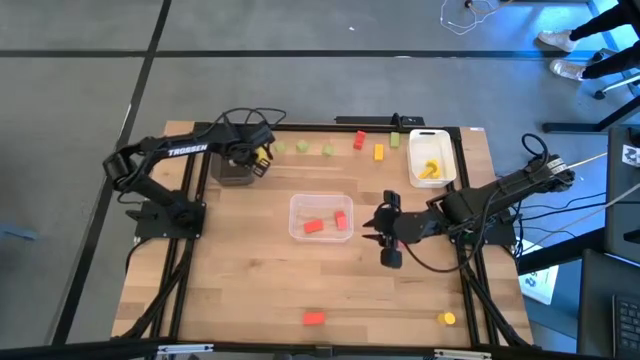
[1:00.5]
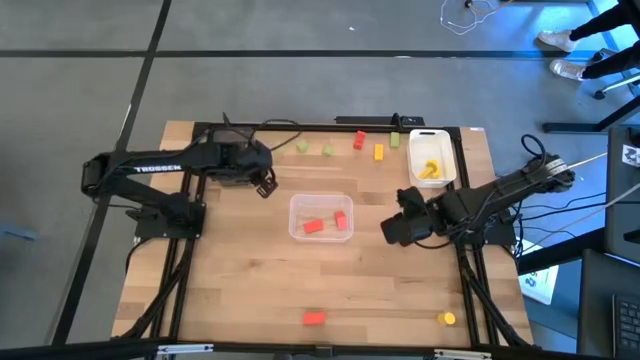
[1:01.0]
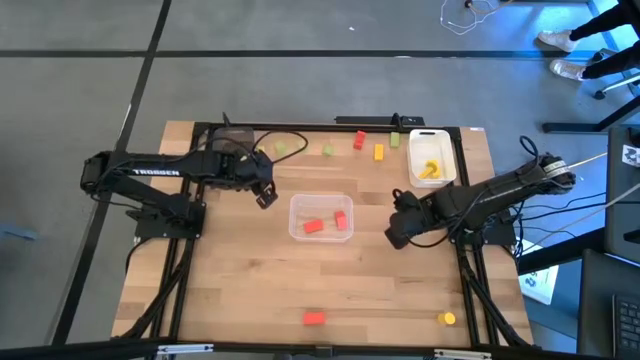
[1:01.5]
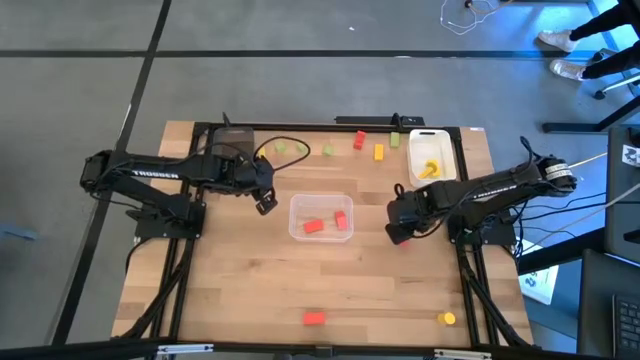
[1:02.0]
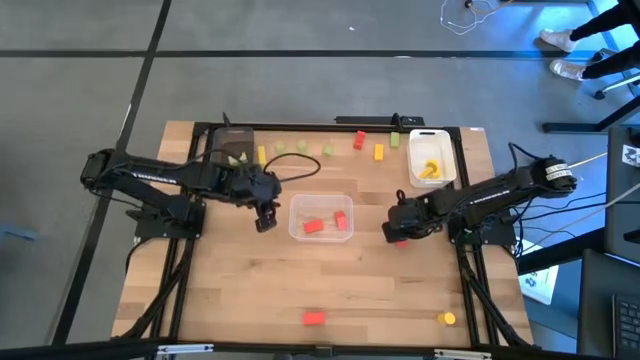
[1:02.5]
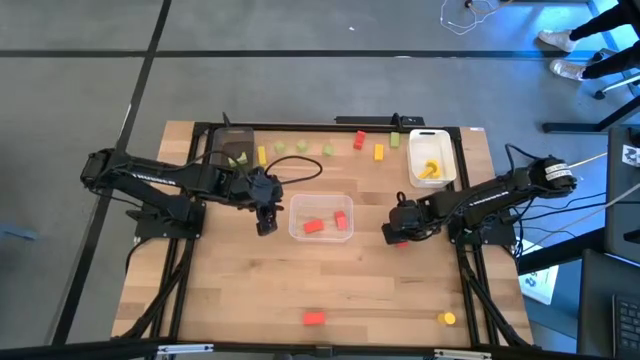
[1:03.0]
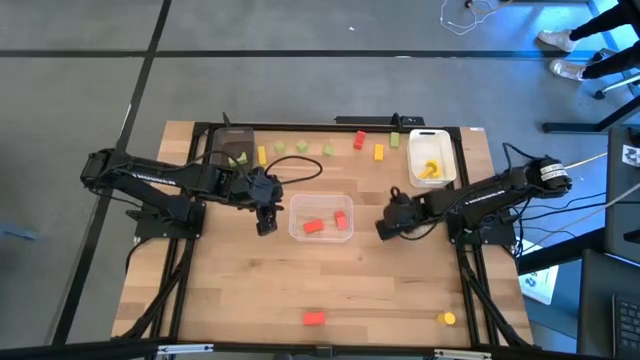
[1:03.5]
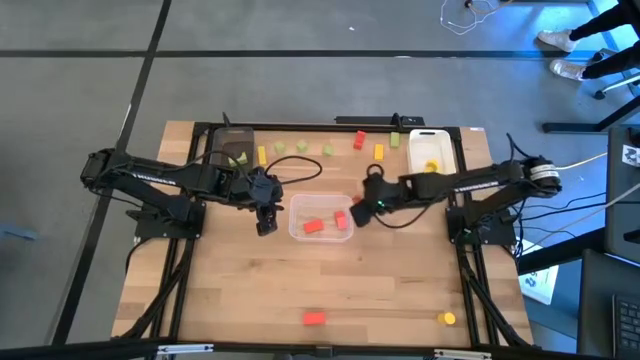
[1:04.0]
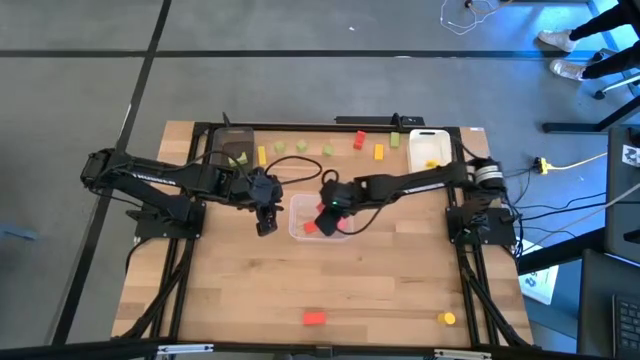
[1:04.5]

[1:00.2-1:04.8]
Task: Sort & place blocks by color
Put the orange block into the transparent bin

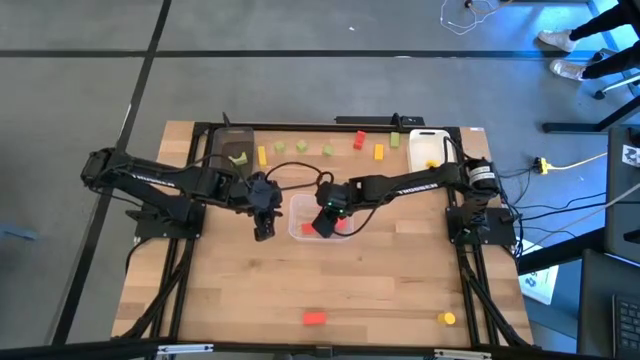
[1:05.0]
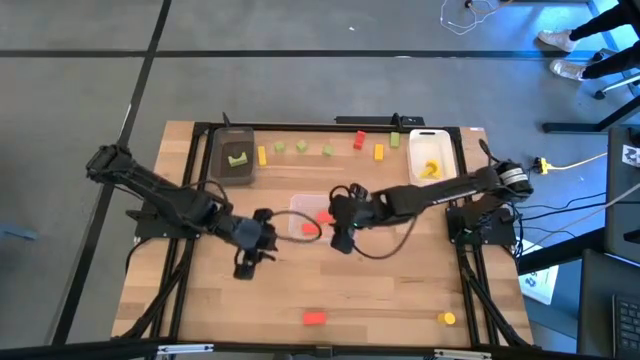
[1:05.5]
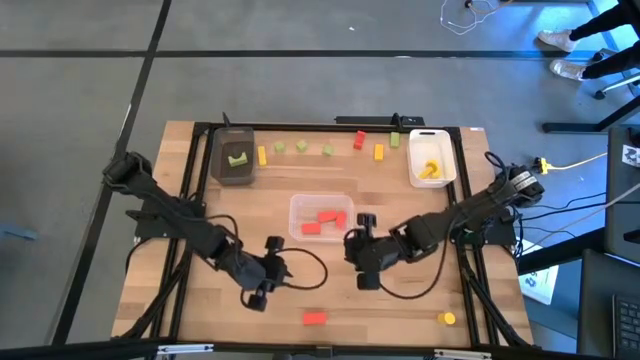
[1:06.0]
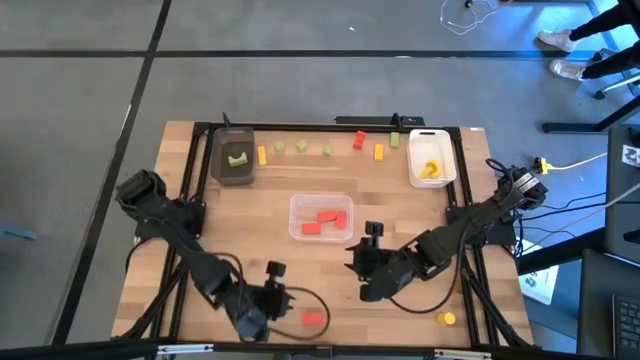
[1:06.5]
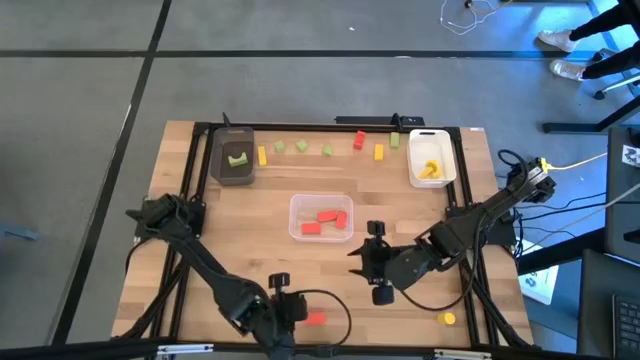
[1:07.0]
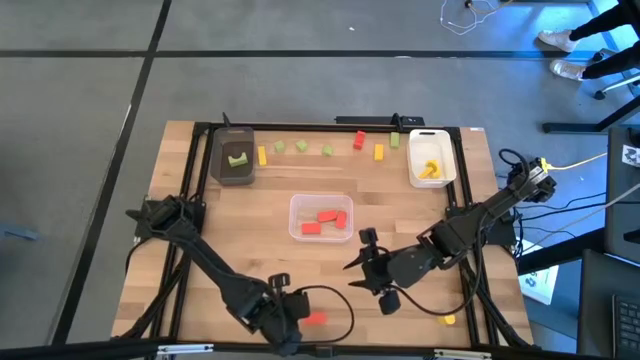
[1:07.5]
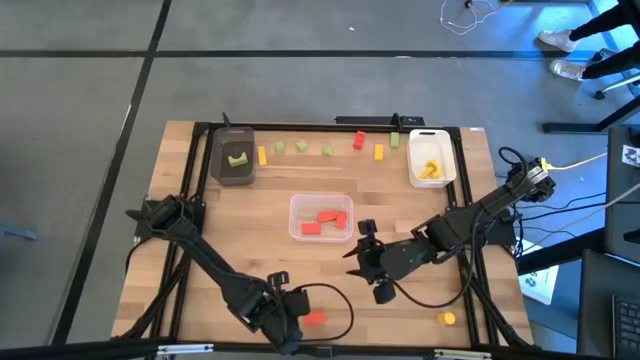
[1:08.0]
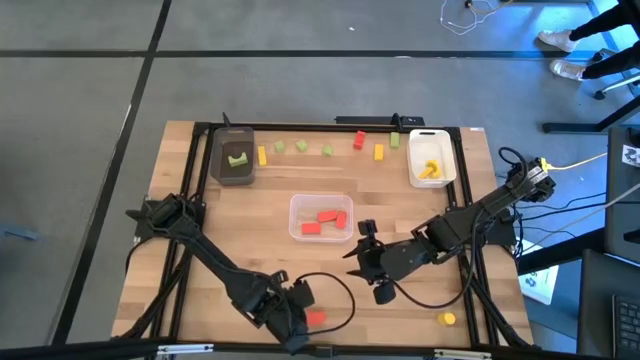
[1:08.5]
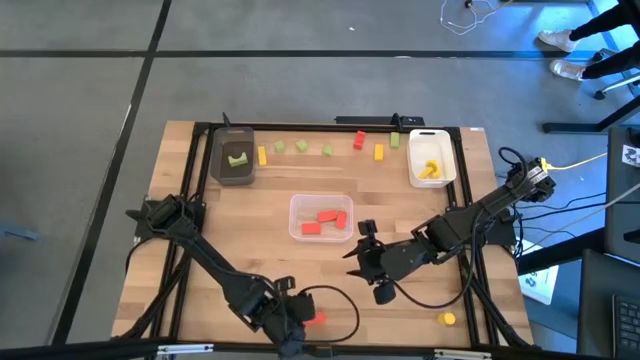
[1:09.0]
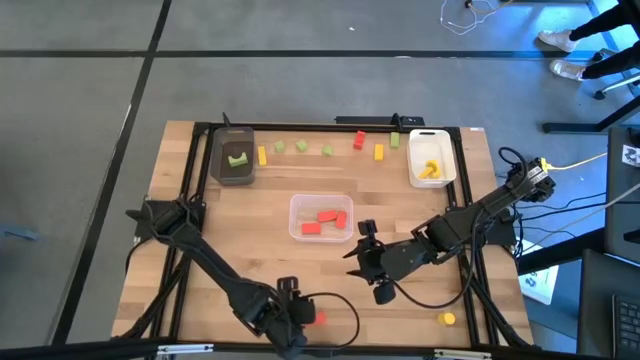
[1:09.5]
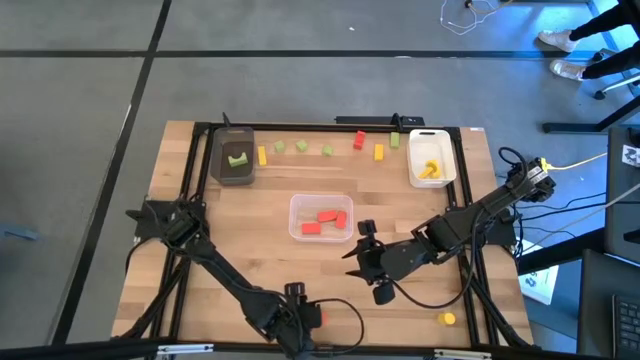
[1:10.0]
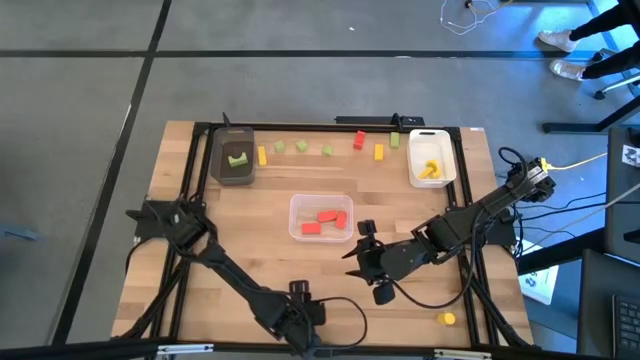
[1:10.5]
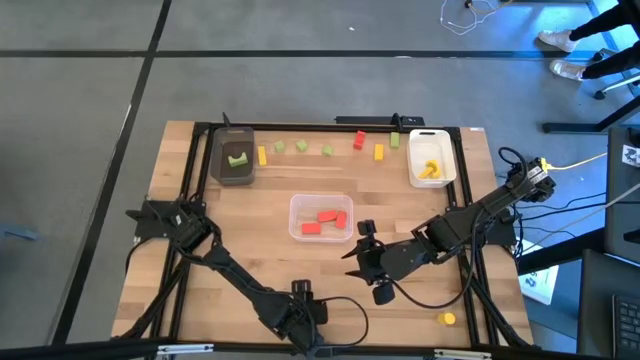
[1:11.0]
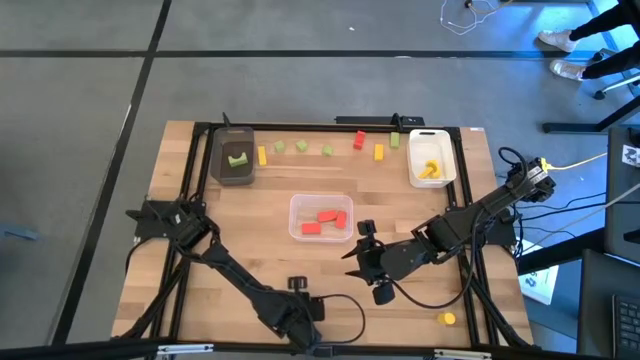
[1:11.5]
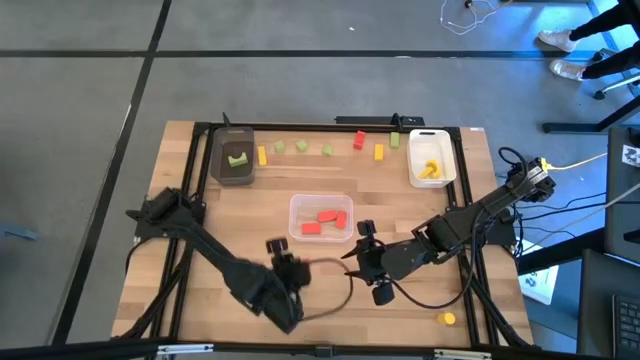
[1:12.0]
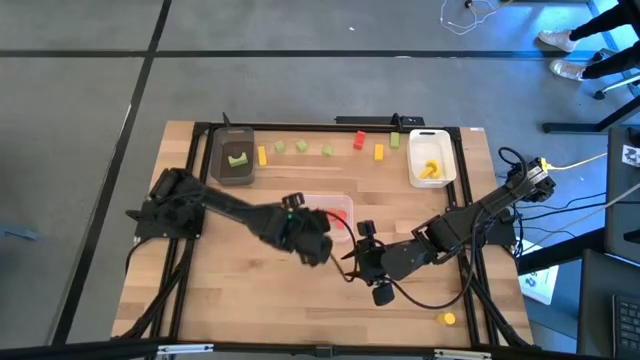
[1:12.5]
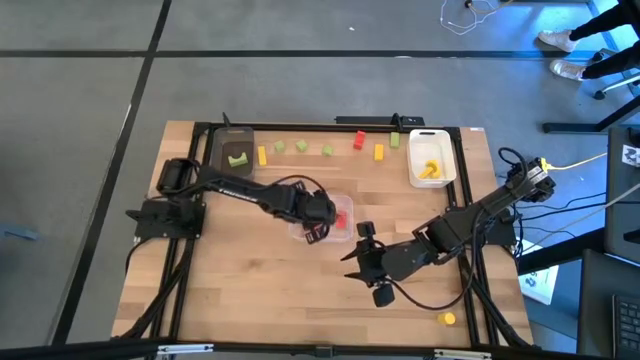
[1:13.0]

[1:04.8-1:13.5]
Put the orange block into the transparent bin

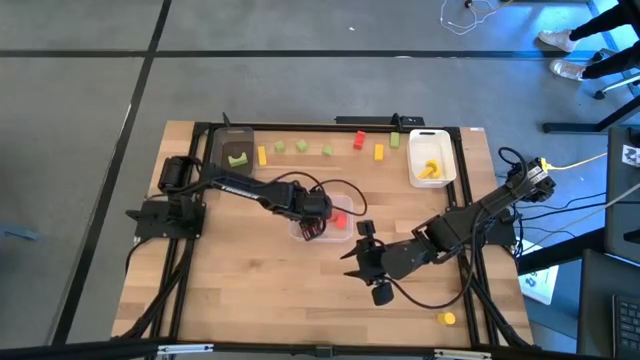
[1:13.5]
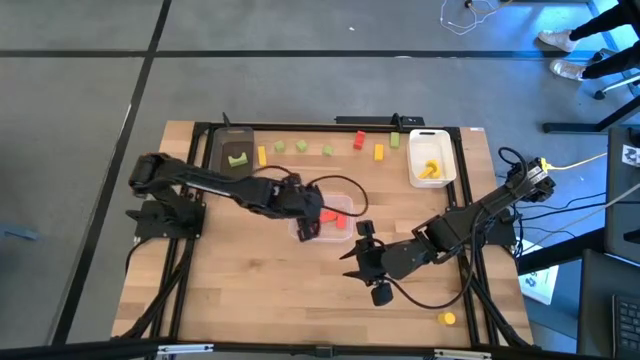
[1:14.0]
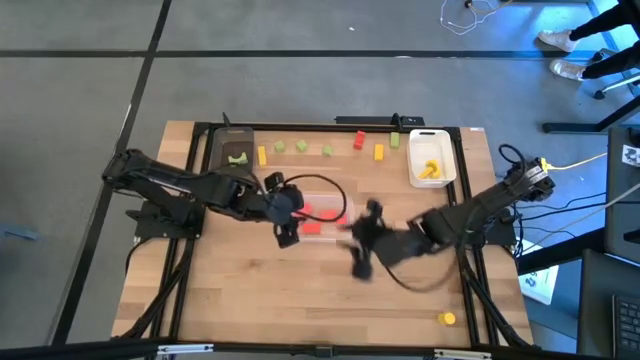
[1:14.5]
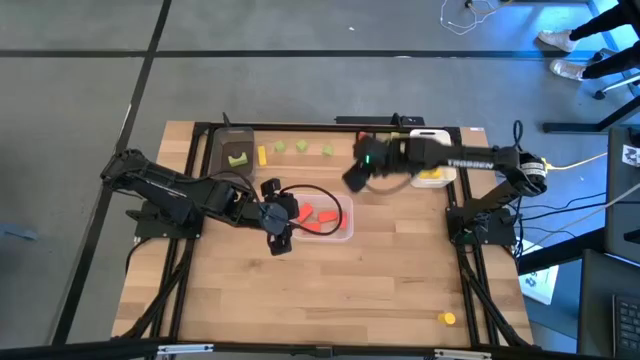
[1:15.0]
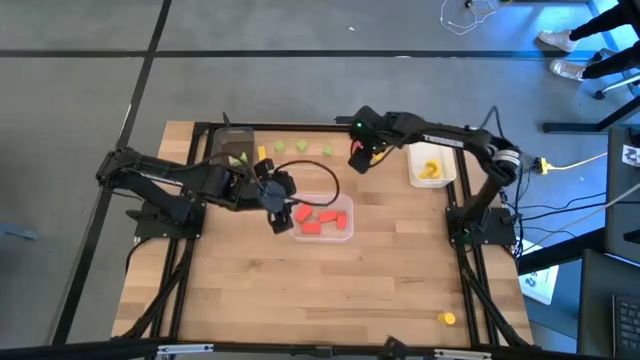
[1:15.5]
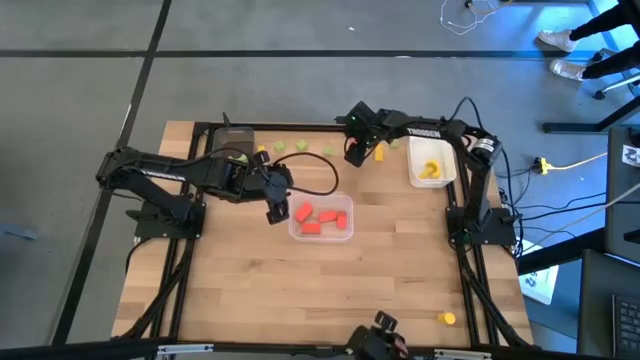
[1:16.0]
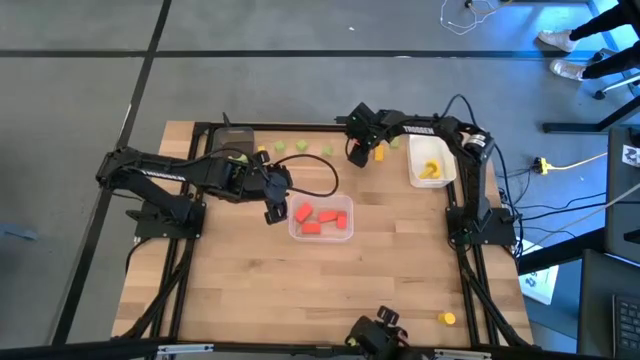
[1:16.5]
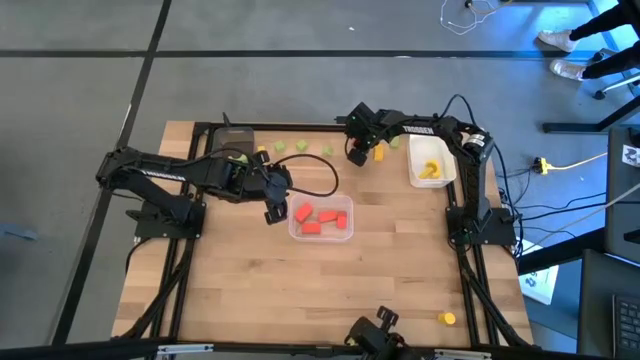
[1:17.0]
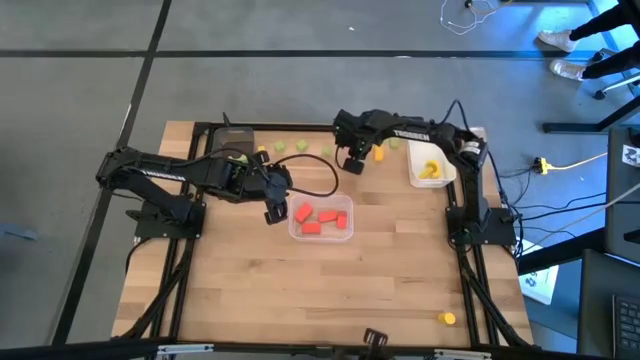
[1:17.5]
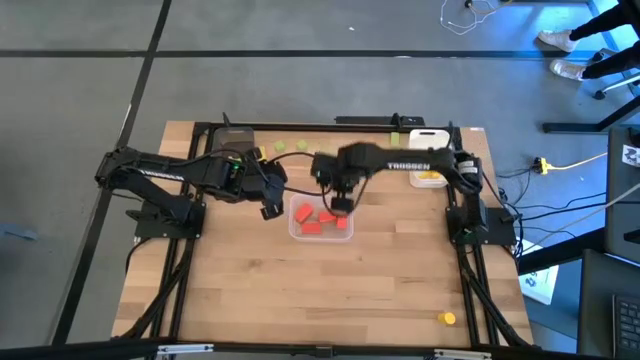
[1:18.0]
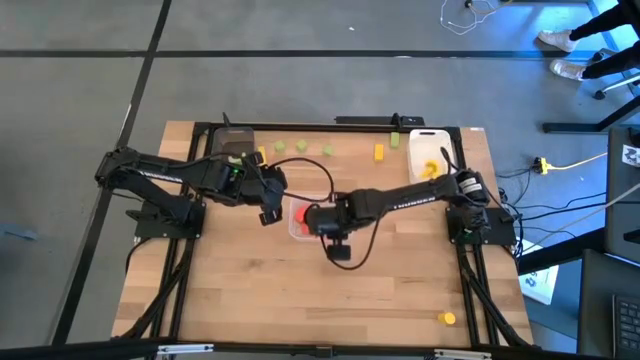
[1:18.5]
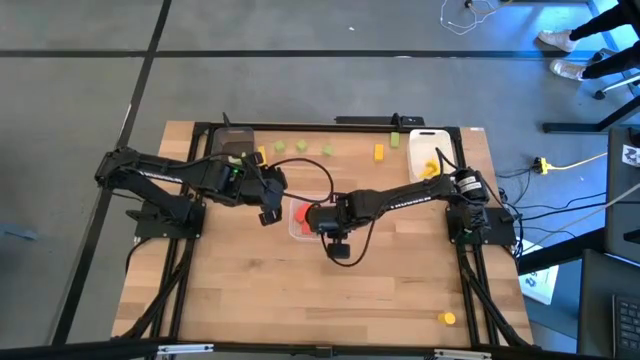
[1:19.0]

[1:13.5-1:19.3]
Put the orange block into the transparent bin

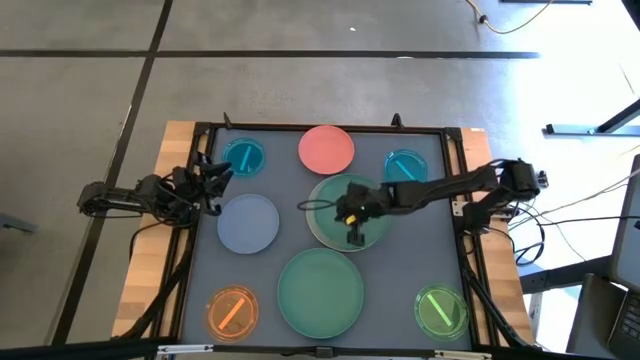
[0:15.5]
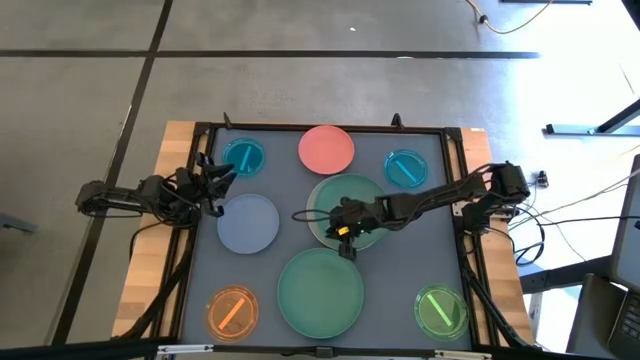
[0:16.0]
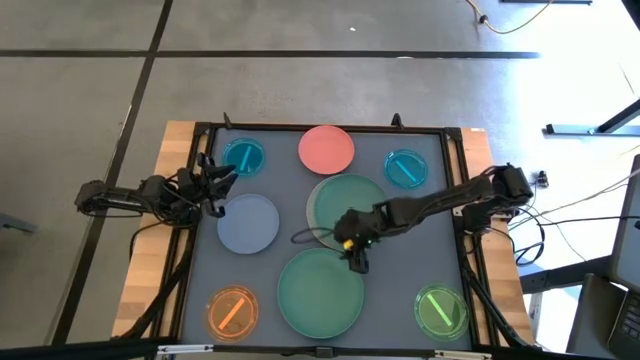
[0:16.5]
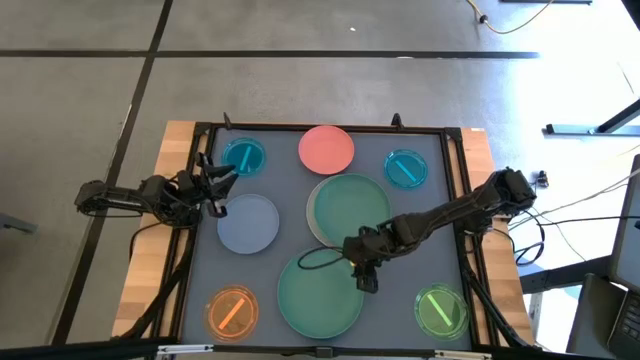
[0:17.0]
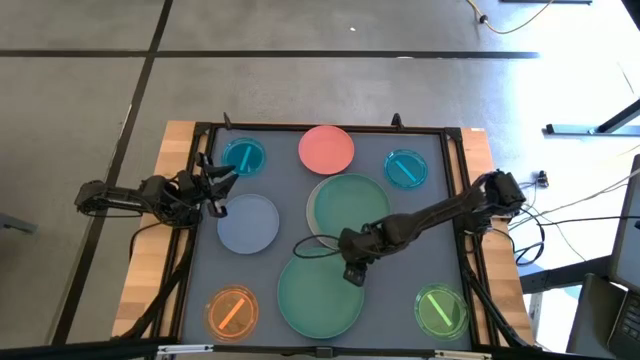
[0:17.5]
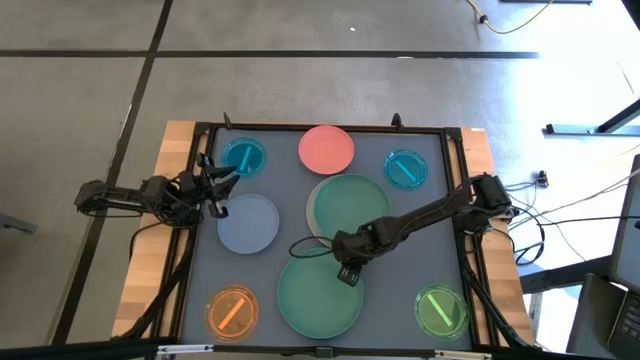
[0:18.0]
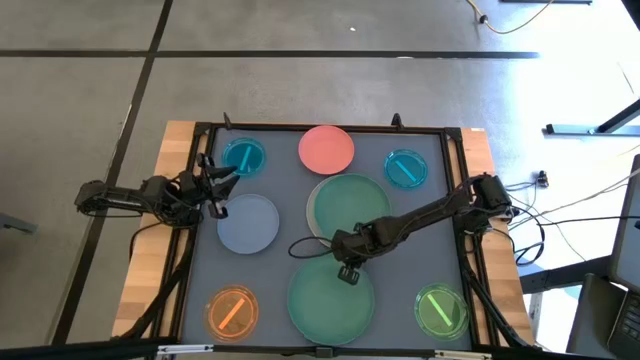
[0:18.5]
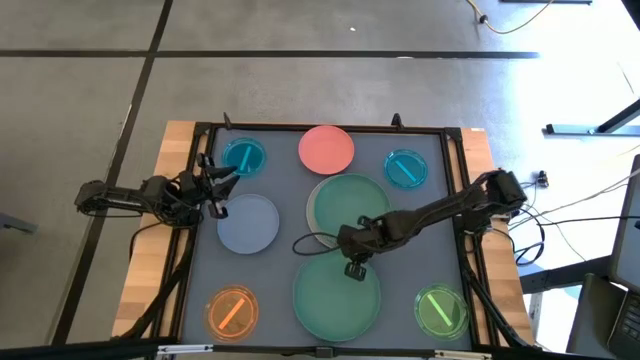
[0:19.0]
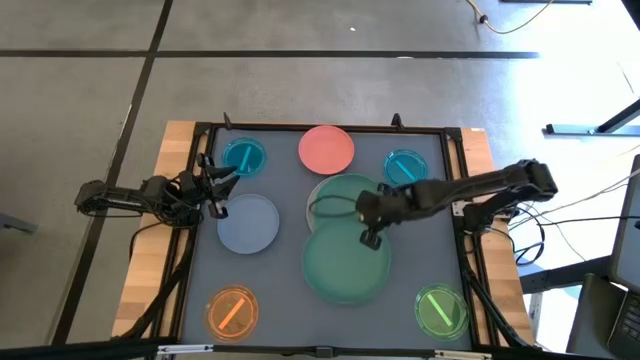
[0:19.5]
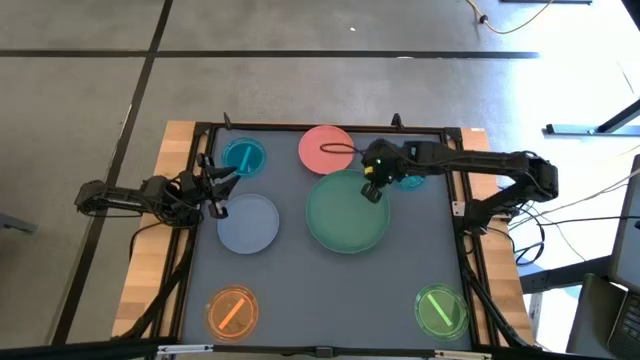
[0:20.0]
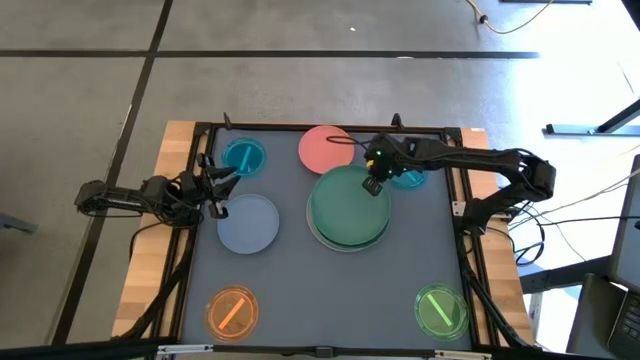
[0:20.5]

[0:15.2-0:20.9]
Task: Stack plastic plates
Stack the green plate on top of the other green plate
